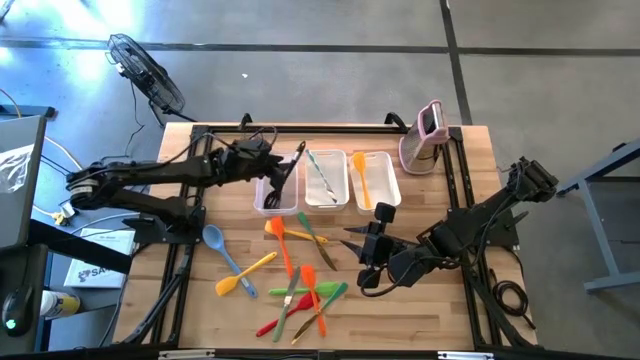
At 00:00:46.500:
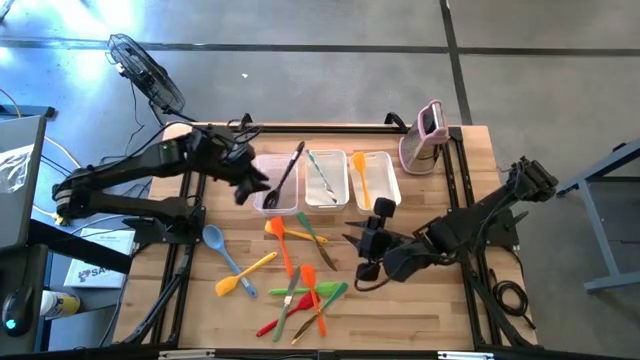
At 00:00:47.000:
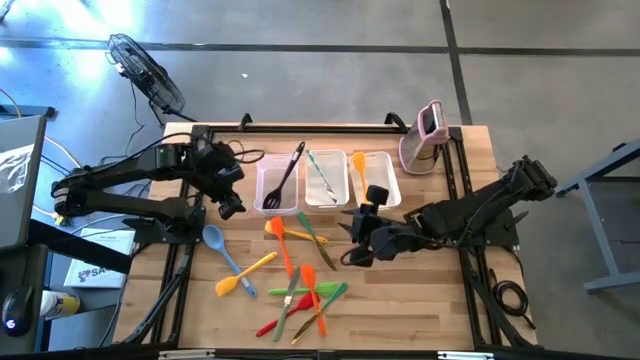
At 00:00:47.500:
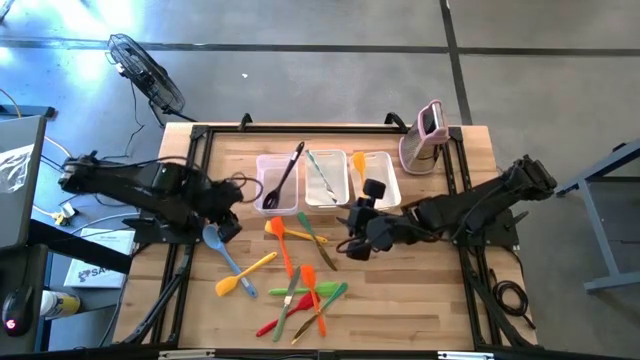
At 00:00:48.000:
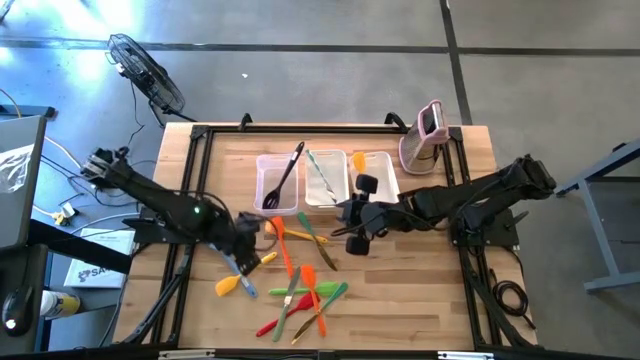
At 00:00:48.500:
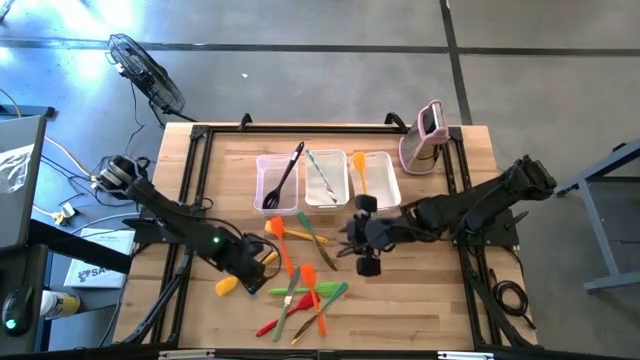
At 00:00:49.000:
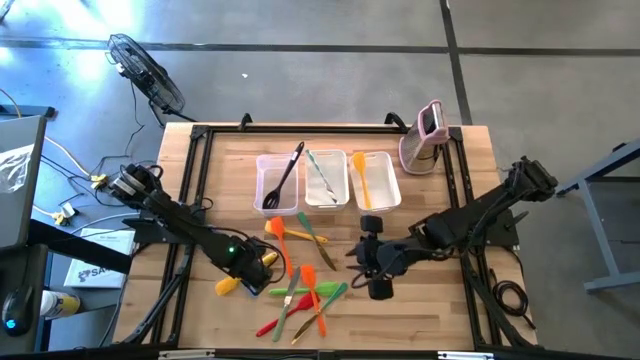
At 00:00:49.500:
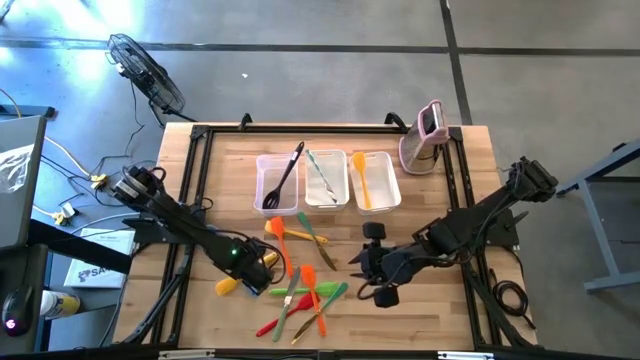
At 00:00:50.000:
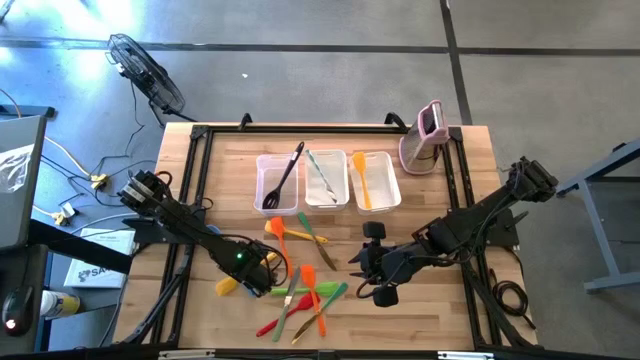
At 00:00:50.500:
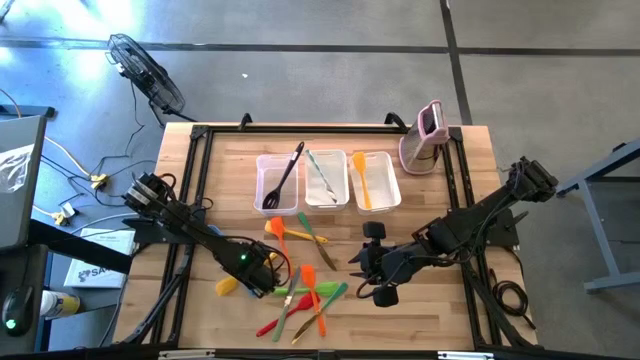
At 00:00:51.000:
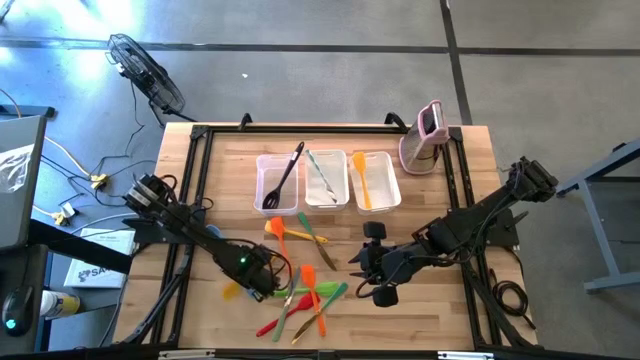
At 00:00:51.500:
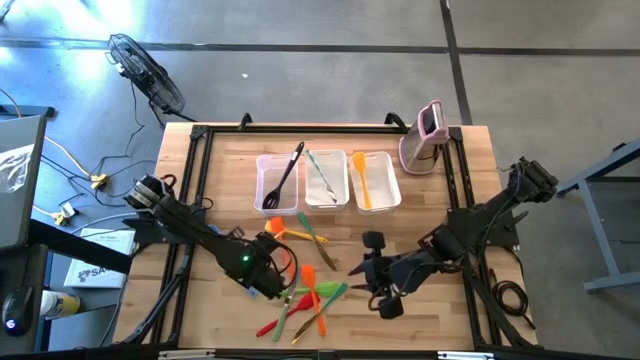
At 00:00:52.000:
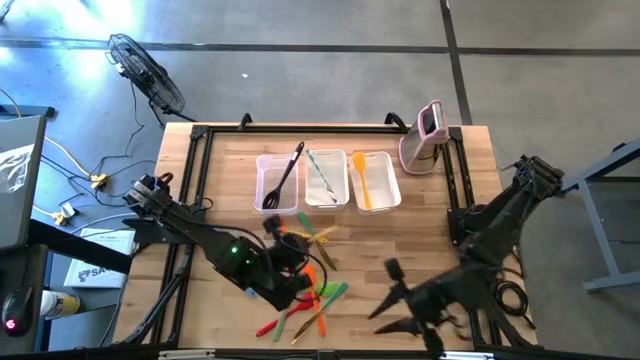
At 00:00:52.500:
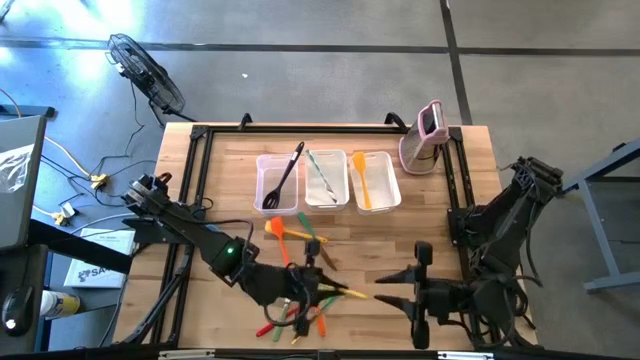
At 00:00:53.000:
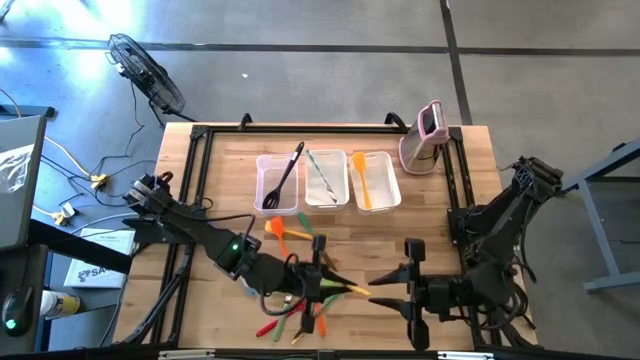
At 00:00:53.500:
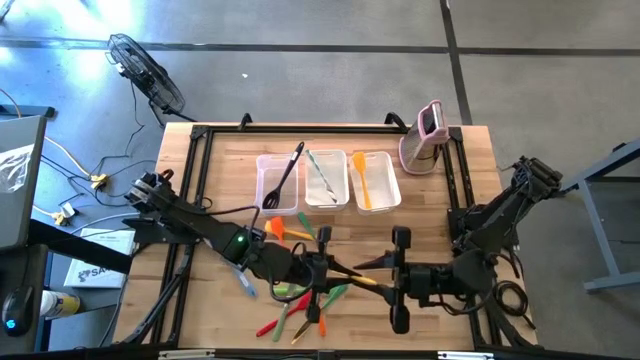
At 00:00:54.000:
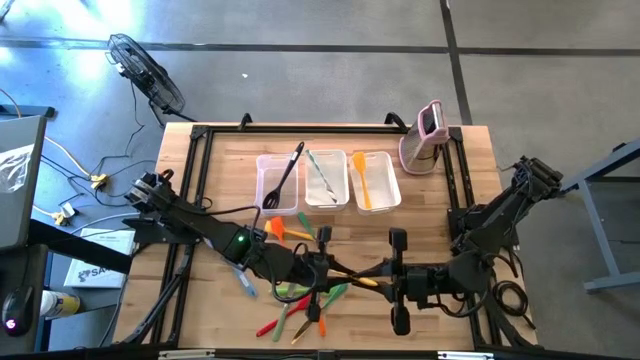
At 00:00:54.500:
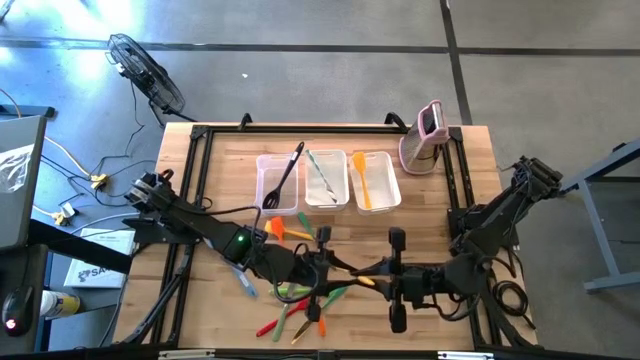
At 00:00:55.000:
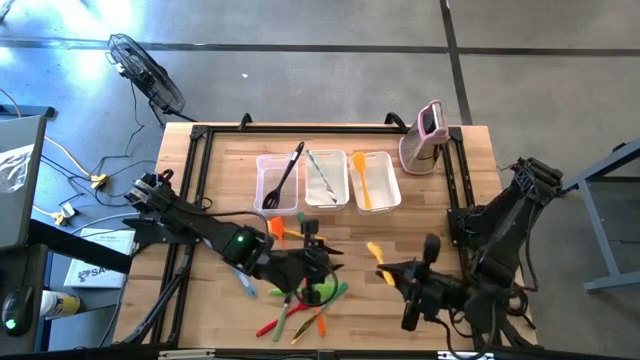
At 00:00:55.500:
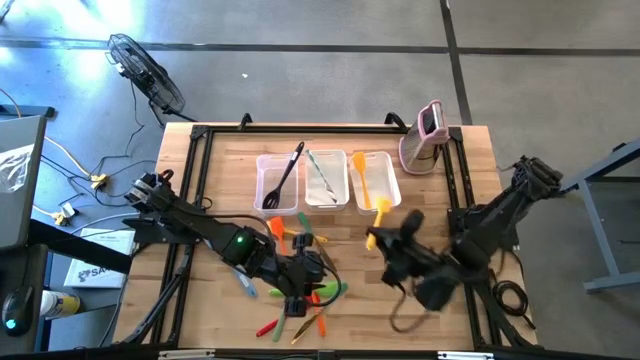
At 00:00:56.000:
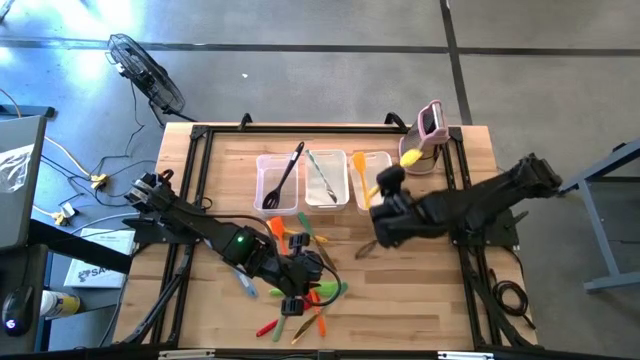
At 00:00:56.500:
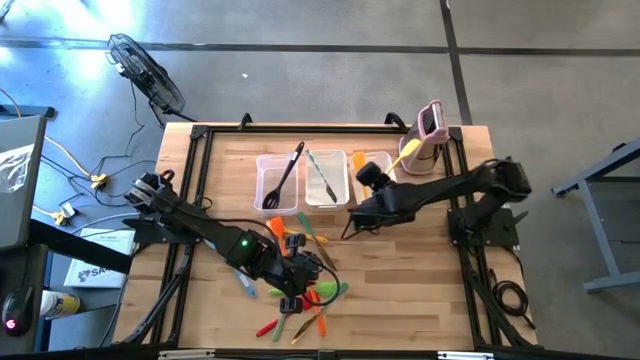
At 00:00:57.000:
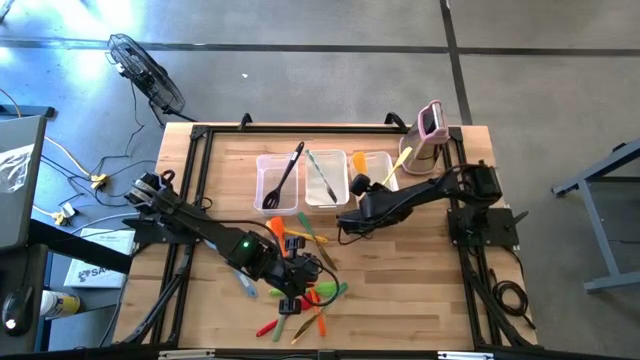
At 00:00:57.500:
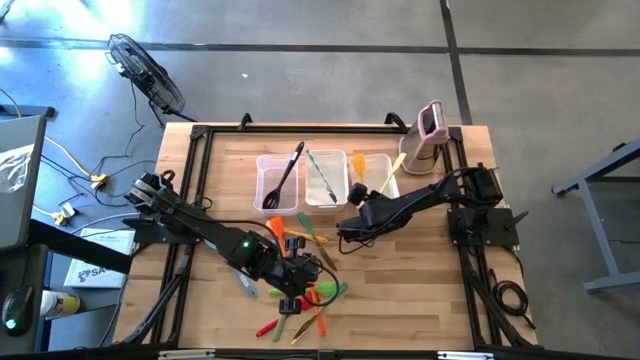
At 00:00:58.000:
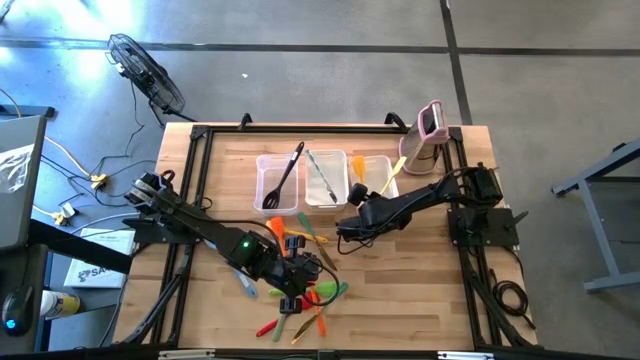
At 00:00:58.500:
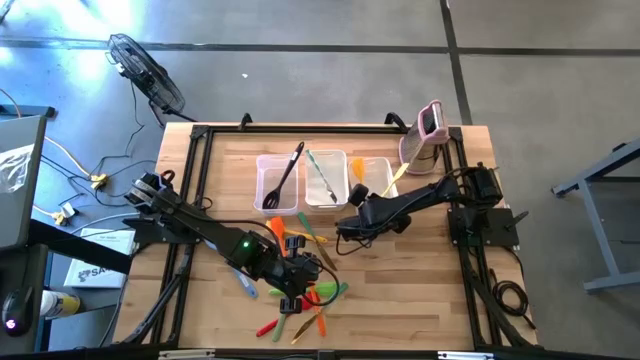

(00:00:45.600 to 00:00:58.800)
Task: Pick & Place Kitchen Items
Put the bottom yellow spatula into the right white bin

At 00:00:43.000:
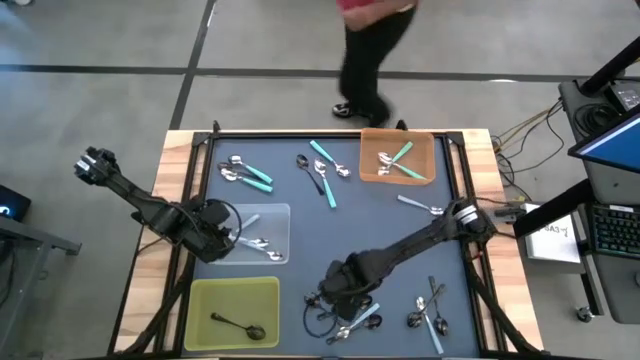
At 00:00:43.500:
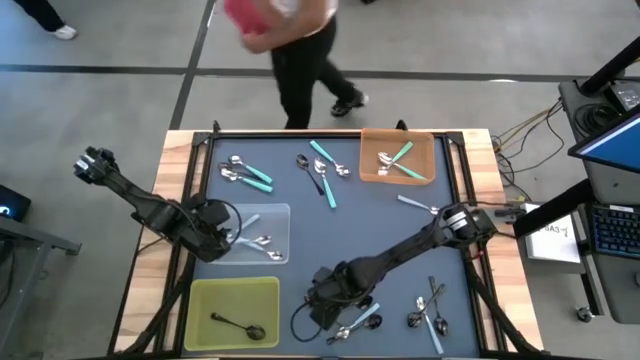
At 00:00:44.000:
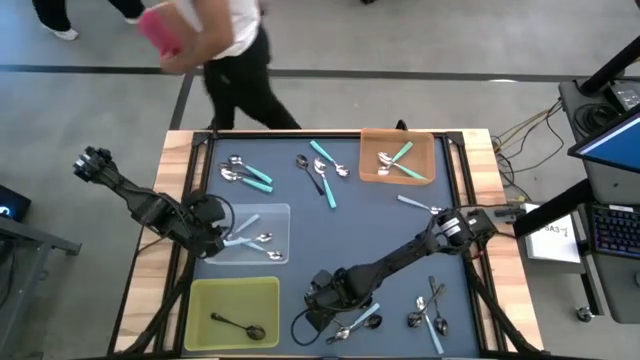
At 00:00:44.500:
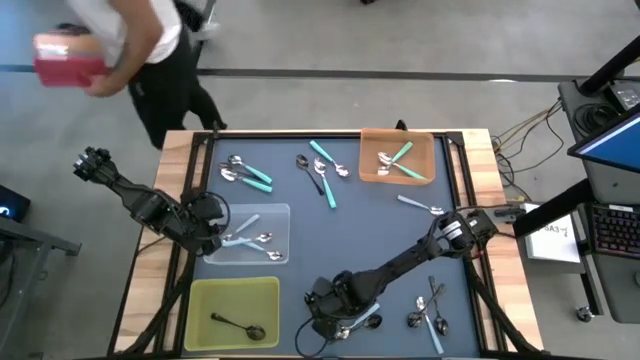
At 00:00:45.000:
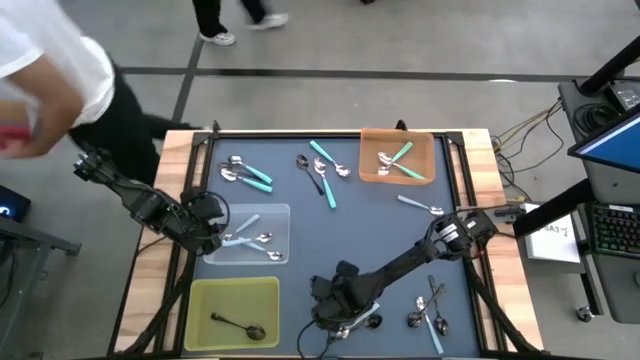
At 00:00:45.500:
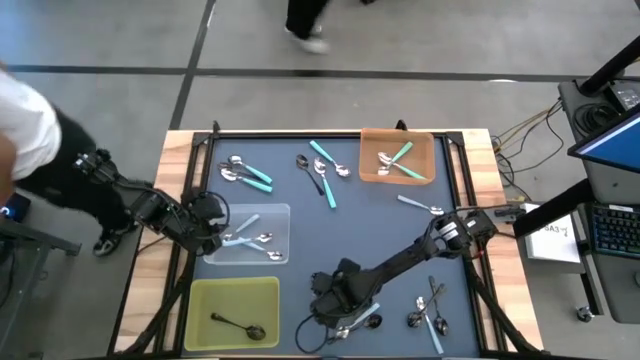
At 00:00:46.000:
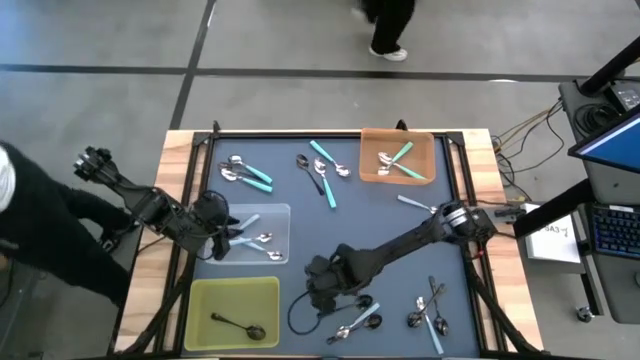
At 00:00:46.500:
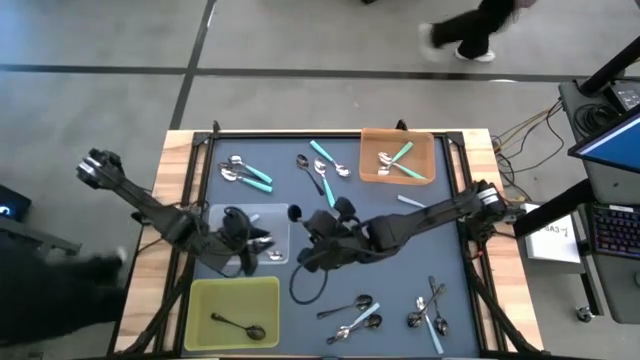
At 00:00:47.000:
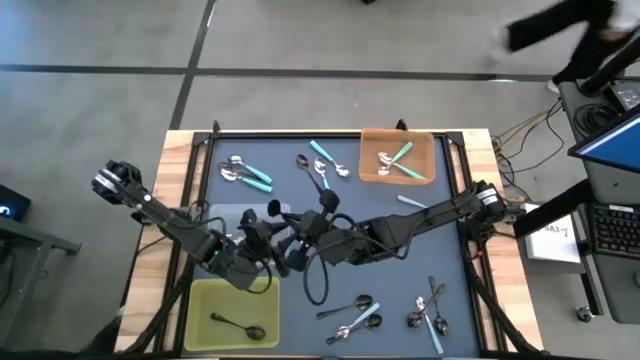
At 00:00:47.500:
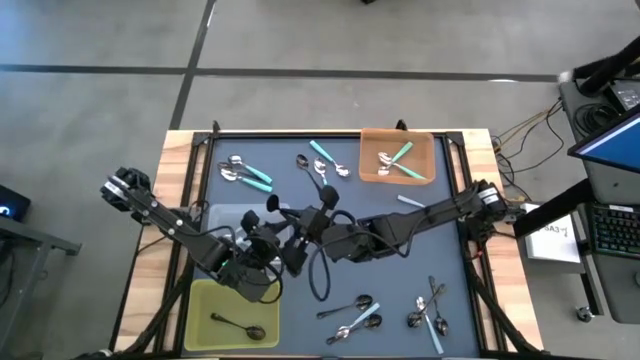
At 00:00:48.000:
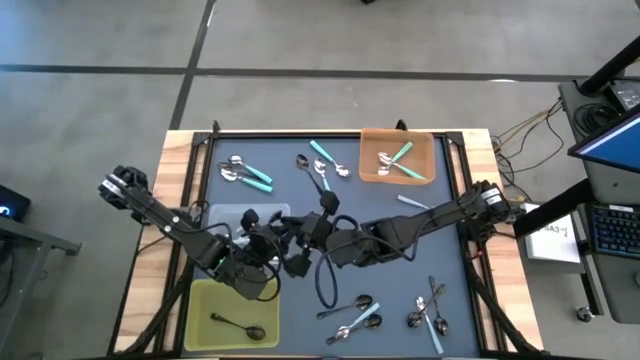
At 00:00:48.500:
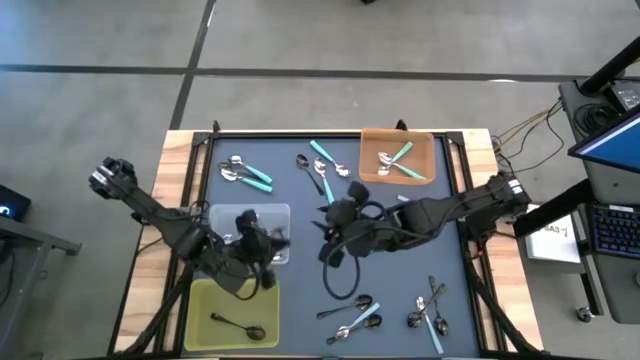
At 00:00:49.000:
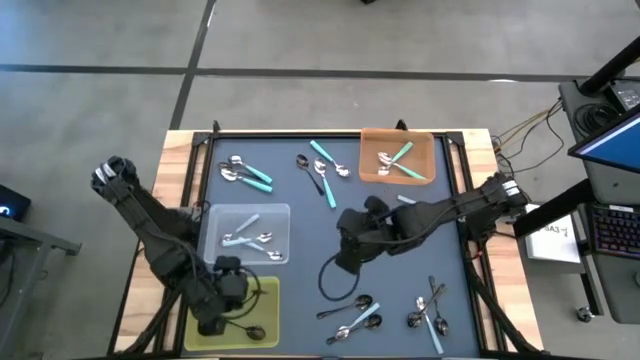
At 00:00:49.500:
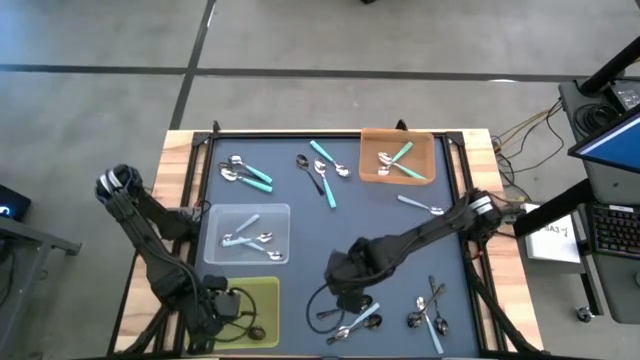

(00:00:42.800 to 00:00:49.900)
Task: Sort silverware by color (type)
Put the black spoon into the yellow bin
